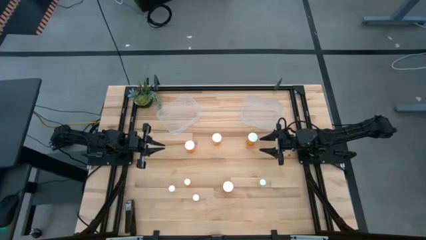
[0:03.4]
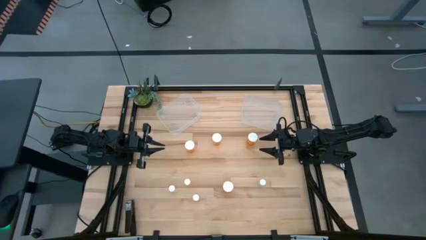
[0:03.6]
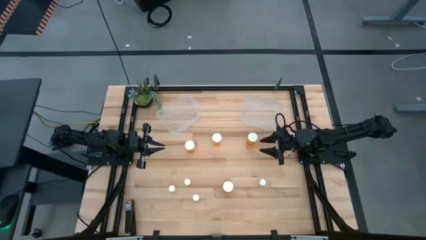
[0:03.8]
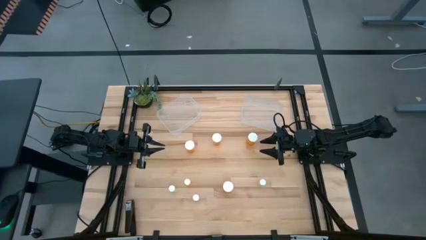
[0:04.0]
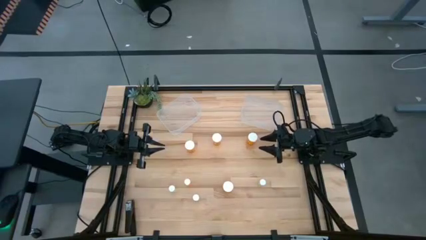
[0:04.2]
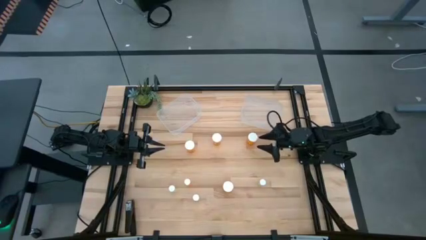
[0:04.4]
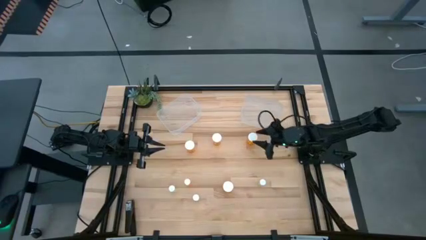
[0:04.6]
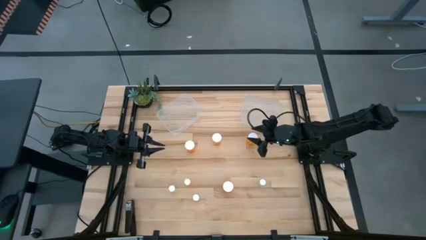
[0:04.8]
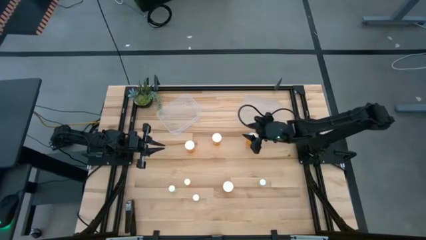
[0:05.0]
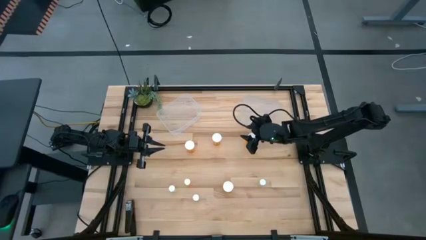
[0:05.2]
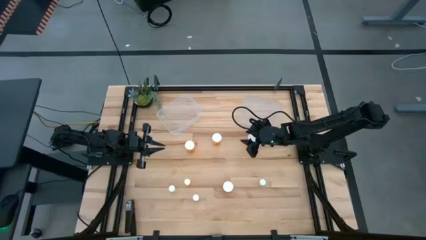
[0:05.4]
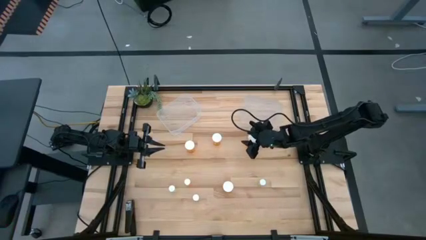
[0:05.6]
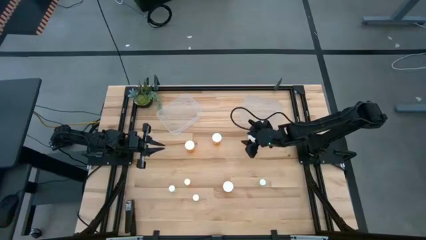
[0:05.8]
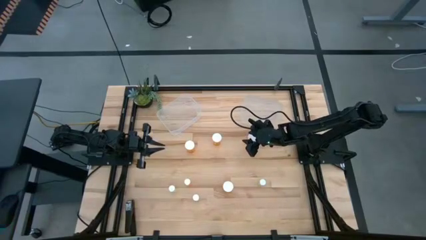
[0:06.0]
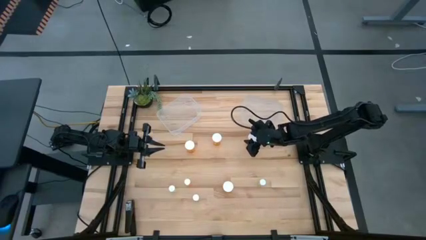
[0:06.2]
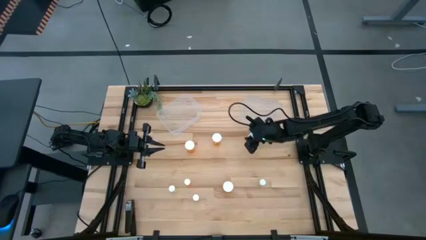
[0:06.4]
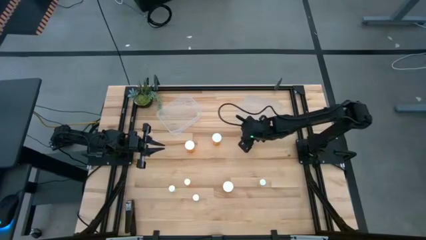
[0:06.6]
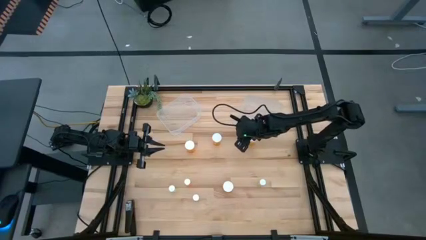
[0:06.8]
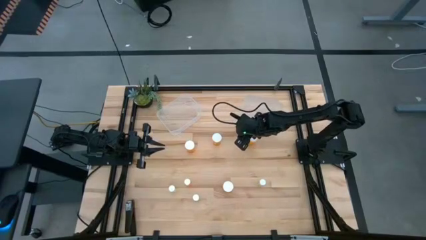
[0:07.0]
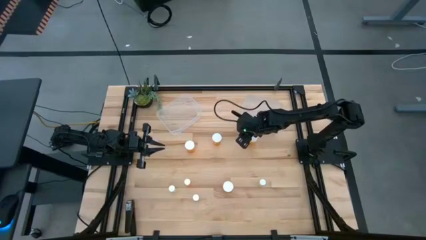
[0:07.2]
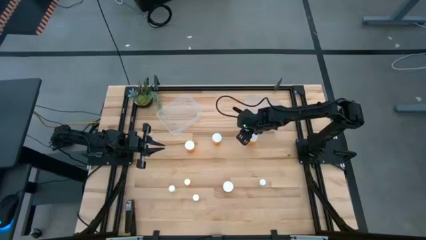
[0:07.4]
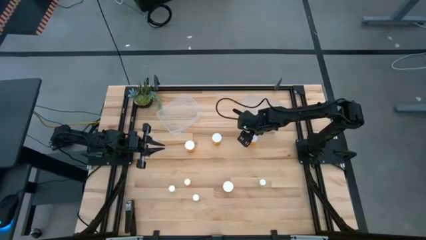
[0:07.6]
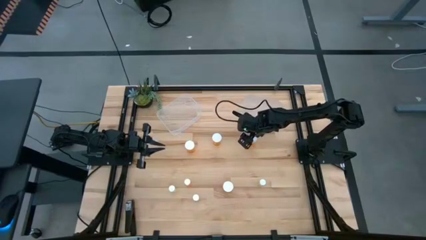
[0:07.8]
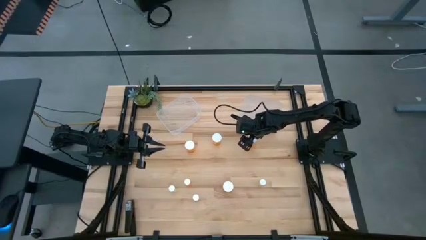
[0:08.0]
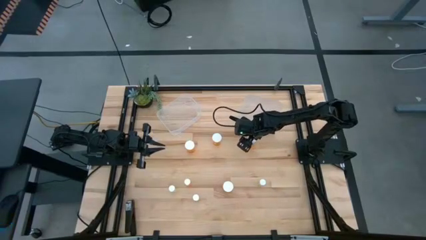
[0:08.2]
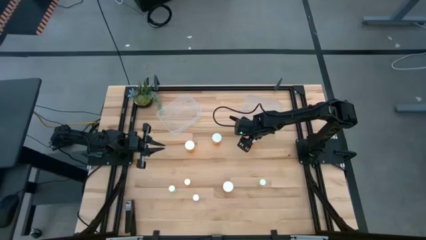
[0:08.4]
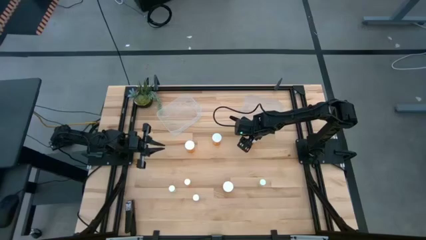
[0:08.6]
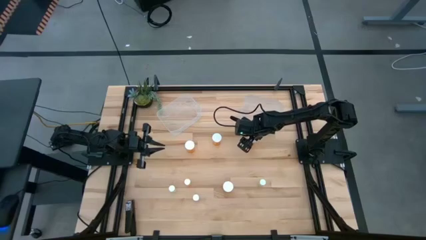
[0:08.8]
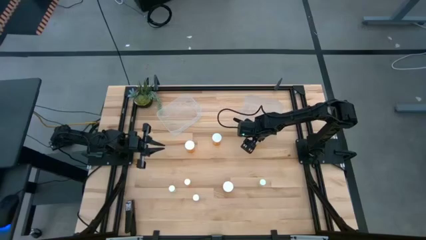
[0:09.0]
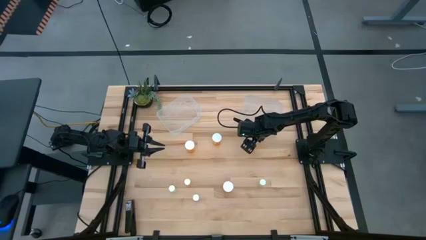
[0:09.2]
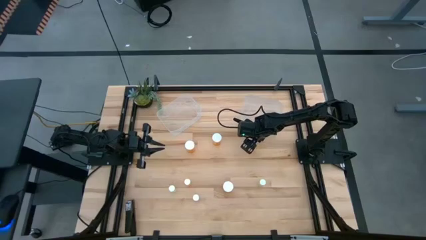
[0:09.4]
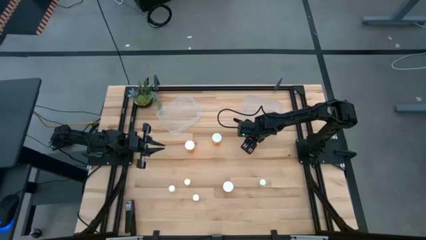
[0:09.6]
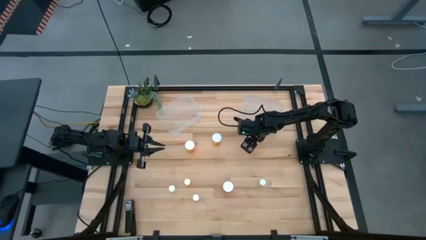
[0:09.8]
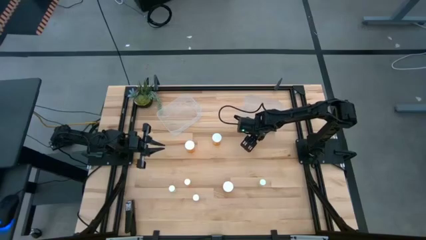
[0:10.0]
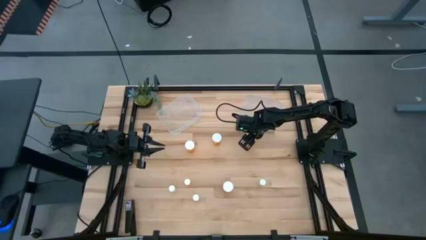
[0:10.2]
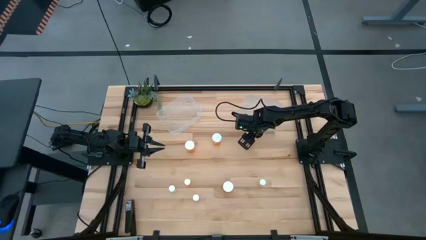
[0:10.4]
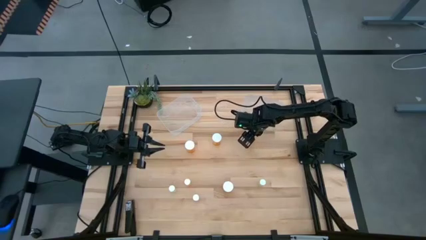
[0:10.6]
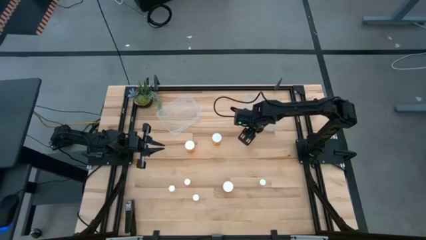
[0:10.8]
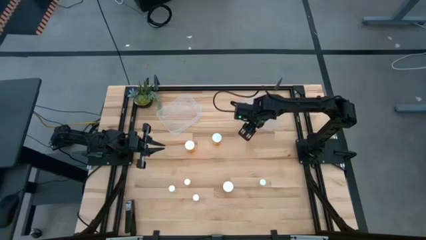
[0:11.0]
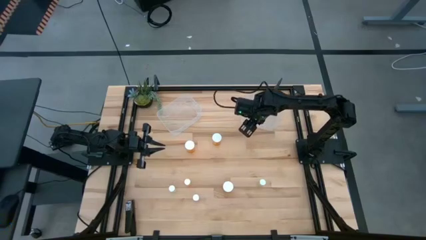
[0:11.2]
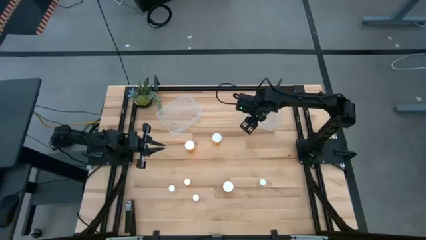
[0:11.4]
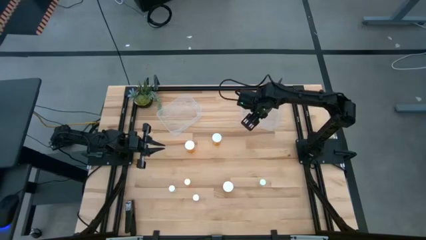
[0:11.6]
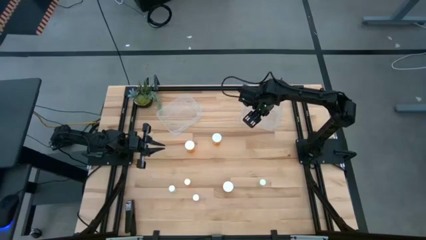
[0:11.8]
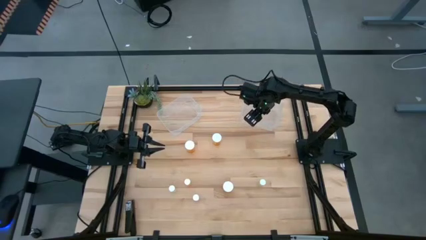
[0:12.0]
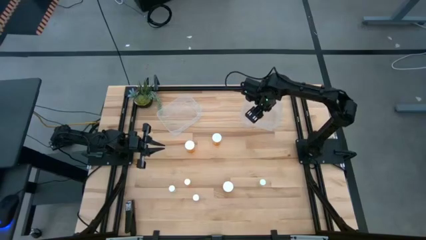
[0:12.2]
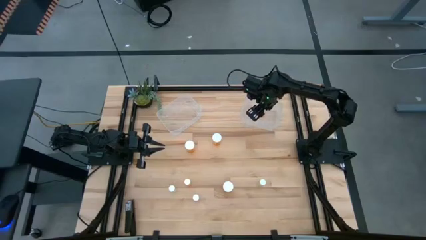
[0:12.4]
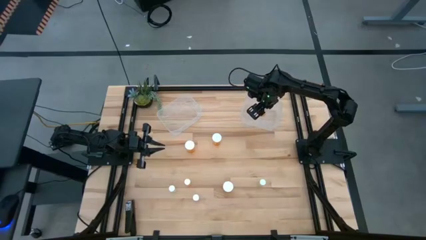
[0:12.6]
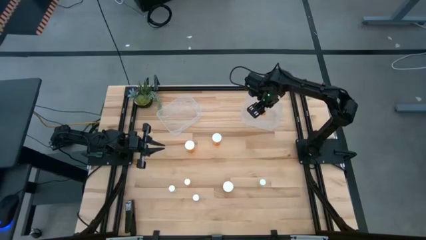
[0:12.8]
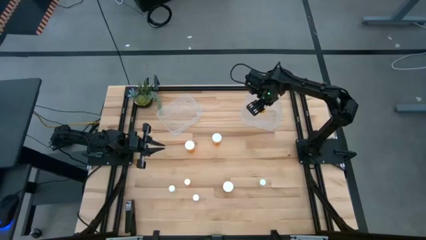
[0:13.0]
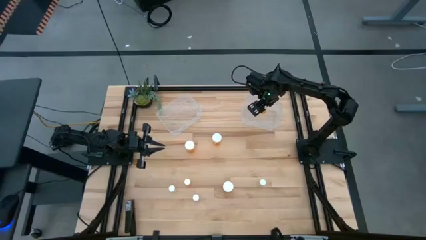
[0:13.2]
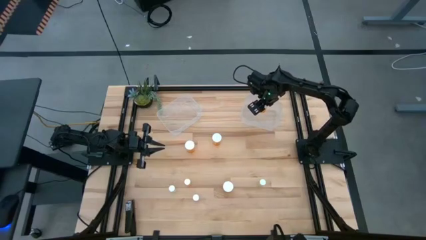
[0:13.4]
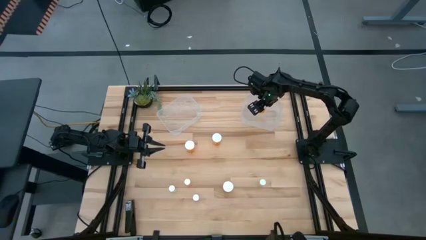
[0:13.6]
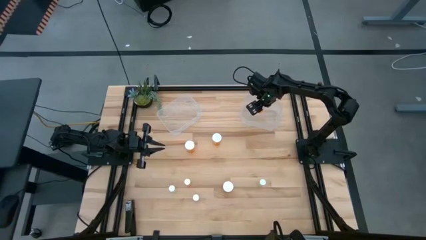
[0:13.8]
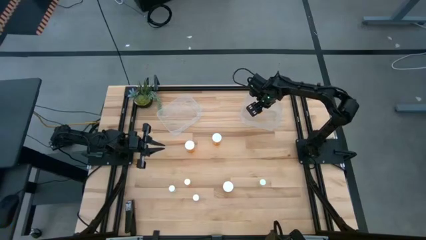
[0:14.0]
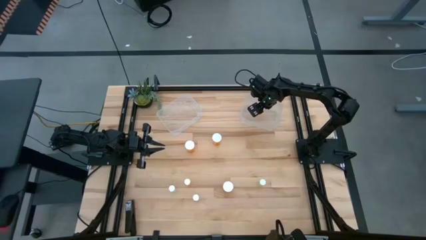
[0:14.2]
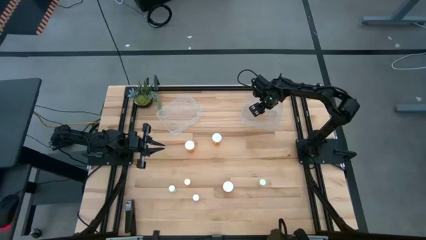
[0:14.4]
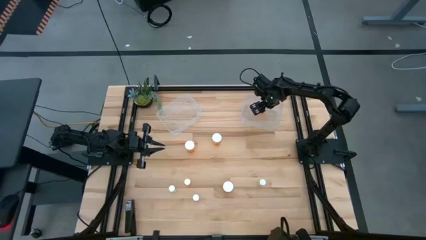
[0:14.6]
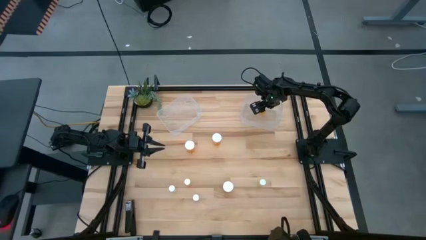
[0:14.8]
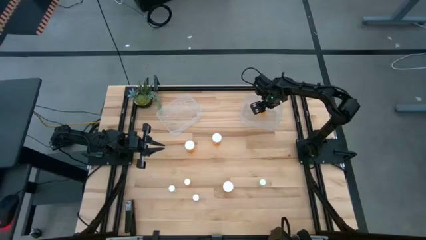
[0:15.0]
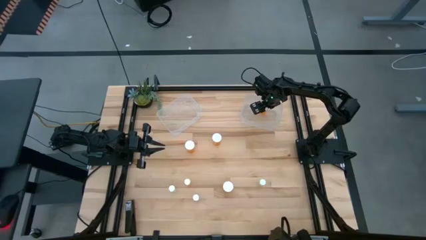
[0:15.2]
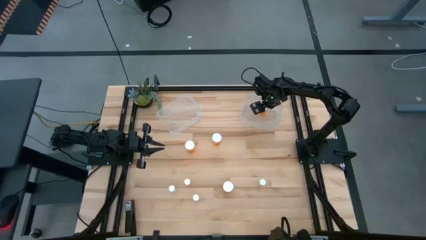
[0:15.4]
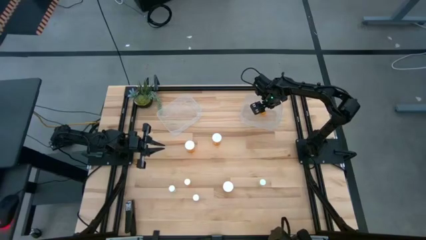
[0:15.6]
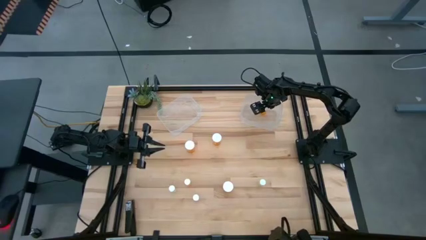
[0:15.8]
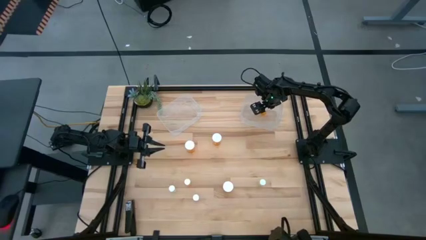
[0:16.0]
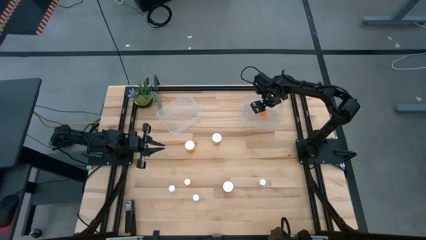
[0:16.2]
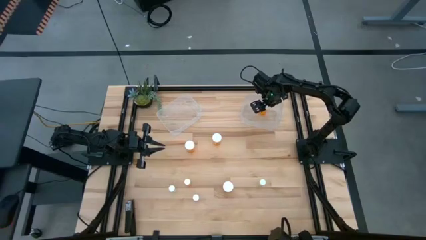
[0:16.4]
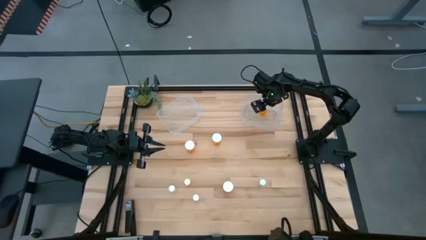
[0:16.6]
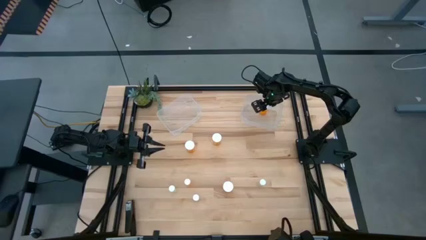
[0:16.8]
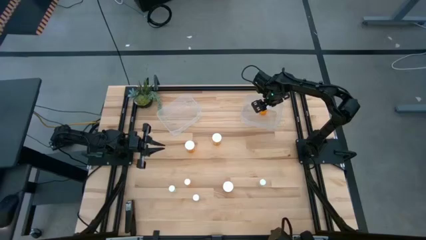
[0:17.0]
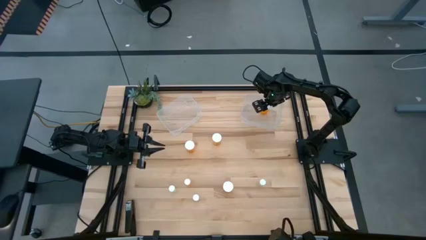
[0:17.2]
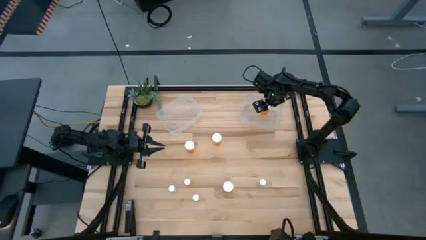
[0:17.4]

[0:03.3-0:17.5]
Task: Pick and place medicine bottles into bin by pill shape (circle, oval)
Put the big orange pill bottle into the right transparent bin
